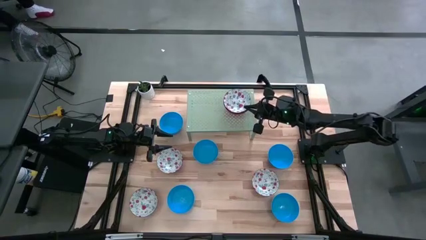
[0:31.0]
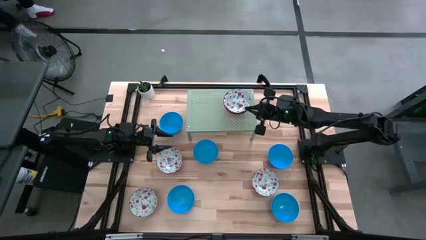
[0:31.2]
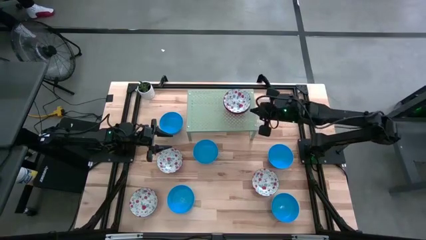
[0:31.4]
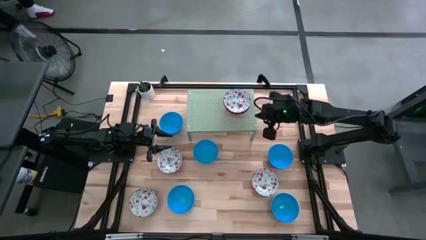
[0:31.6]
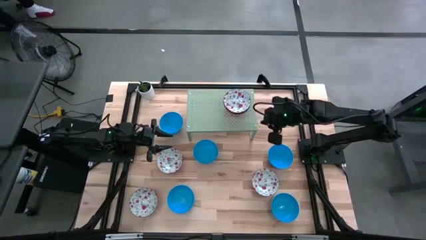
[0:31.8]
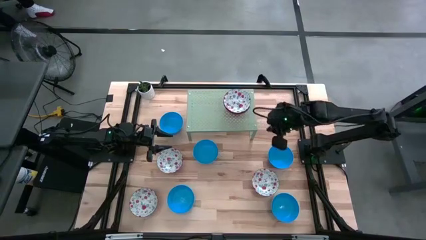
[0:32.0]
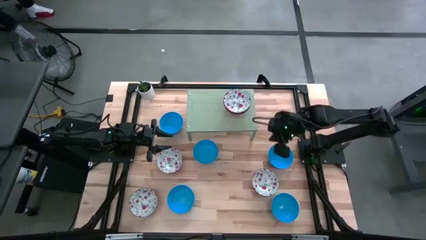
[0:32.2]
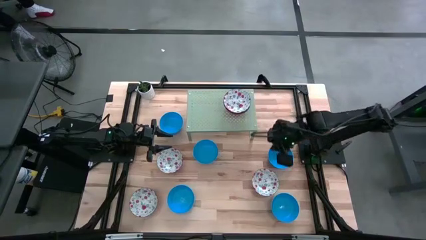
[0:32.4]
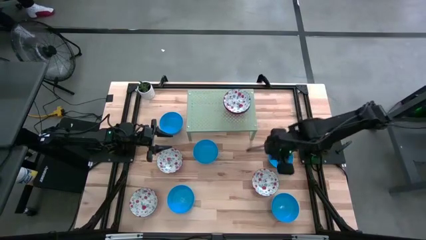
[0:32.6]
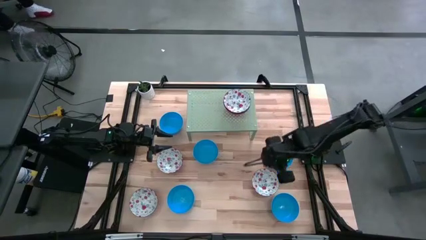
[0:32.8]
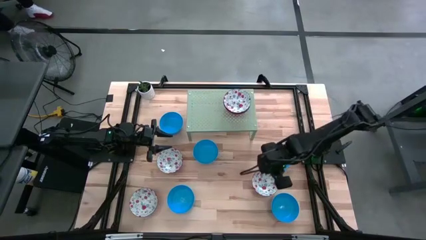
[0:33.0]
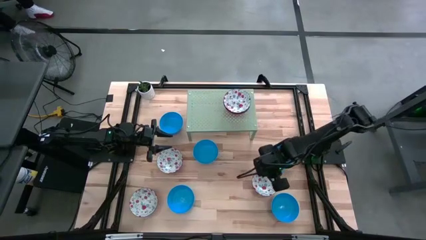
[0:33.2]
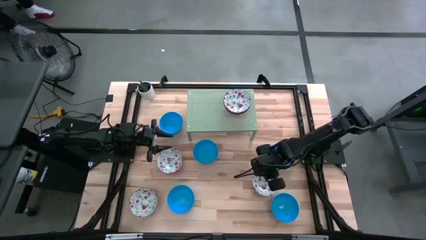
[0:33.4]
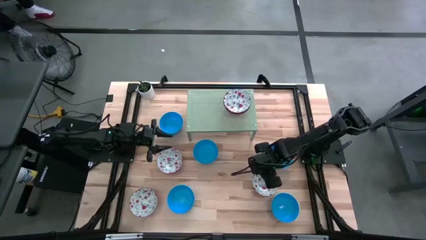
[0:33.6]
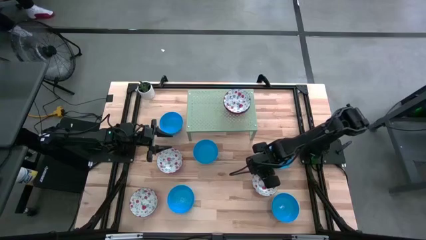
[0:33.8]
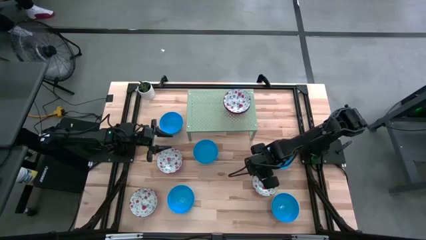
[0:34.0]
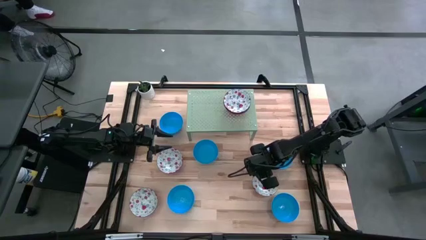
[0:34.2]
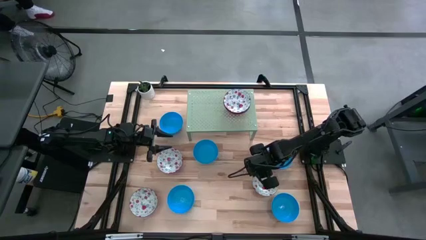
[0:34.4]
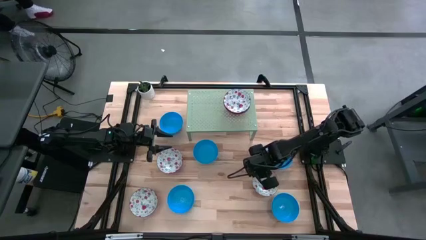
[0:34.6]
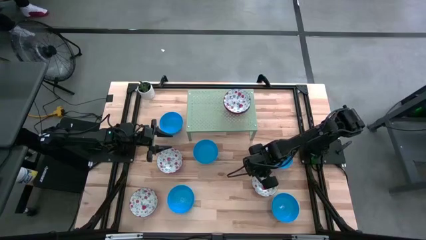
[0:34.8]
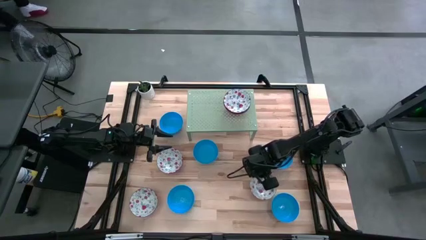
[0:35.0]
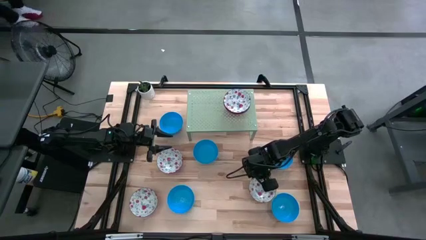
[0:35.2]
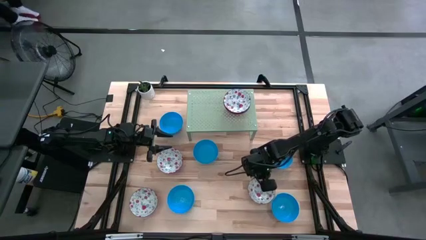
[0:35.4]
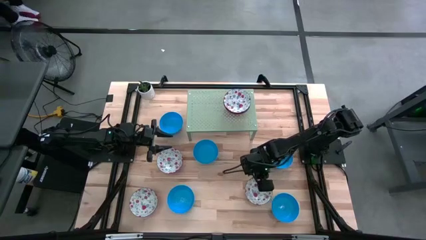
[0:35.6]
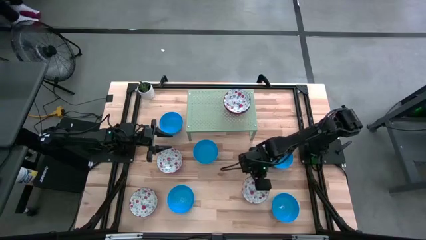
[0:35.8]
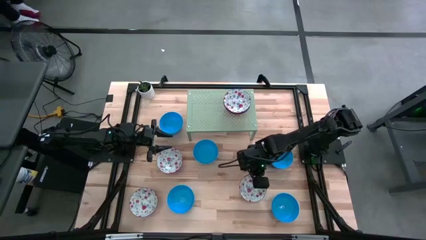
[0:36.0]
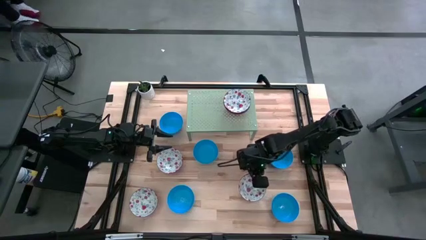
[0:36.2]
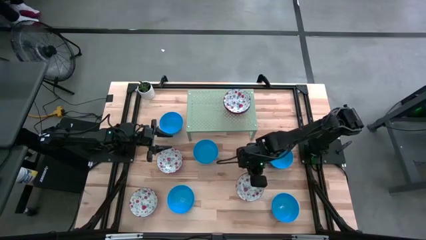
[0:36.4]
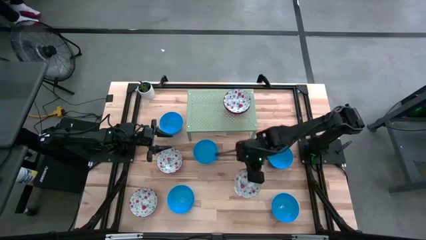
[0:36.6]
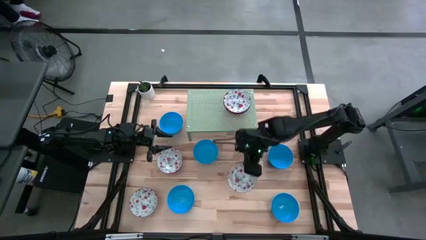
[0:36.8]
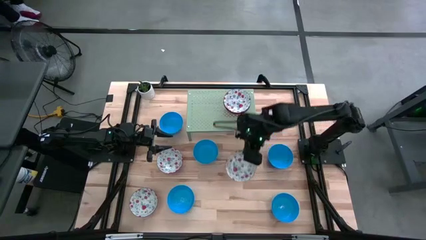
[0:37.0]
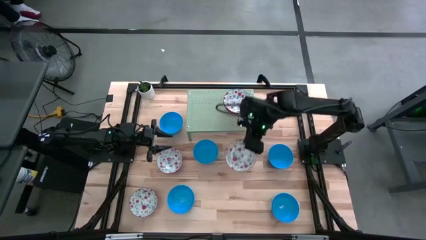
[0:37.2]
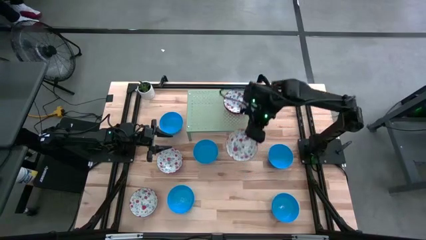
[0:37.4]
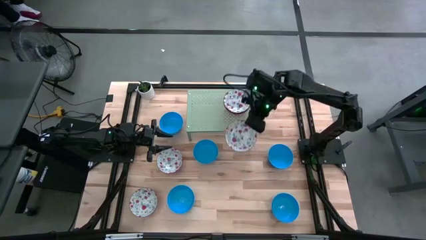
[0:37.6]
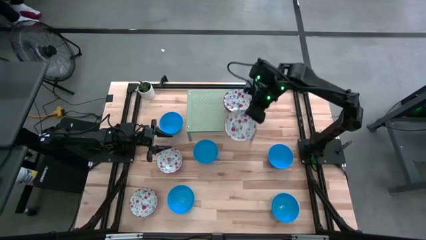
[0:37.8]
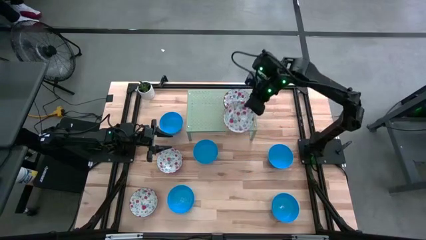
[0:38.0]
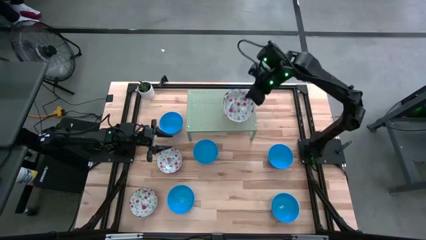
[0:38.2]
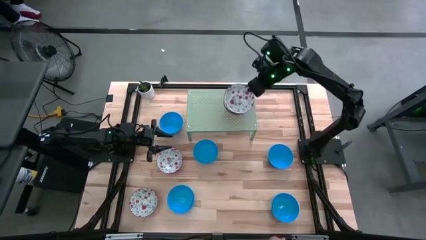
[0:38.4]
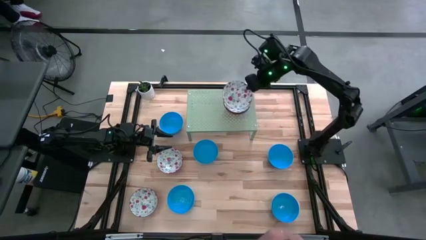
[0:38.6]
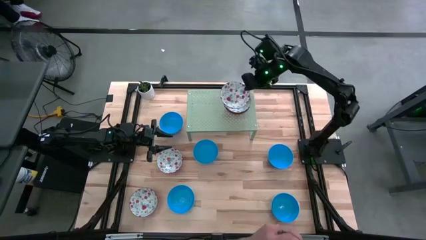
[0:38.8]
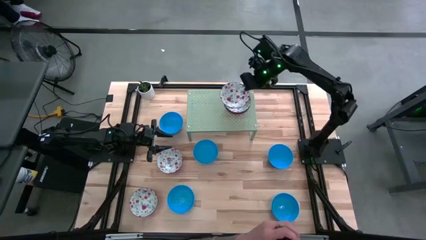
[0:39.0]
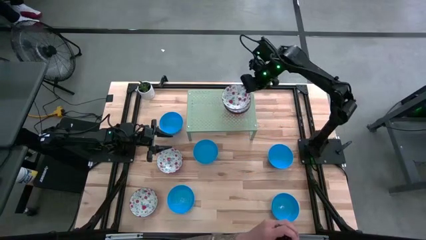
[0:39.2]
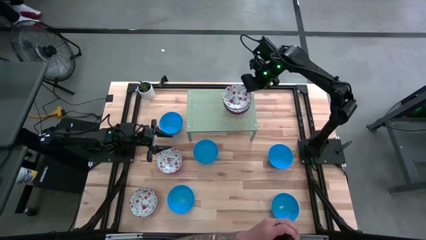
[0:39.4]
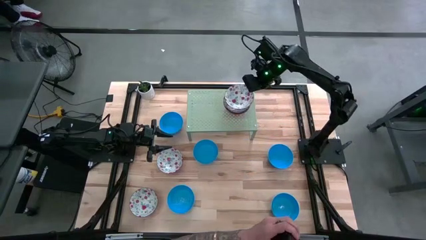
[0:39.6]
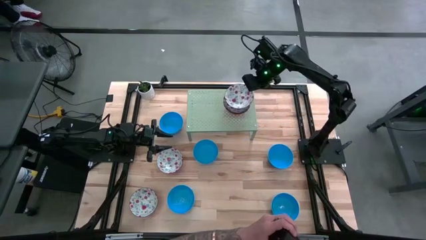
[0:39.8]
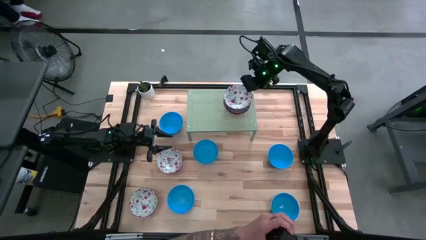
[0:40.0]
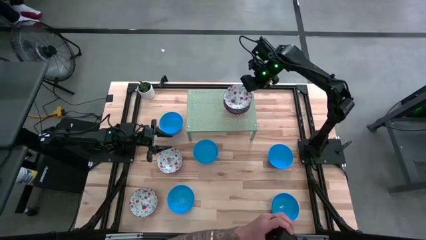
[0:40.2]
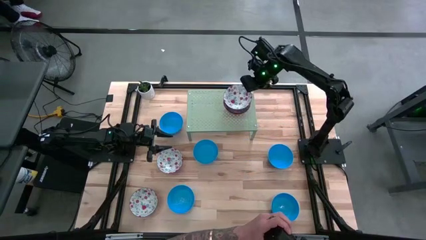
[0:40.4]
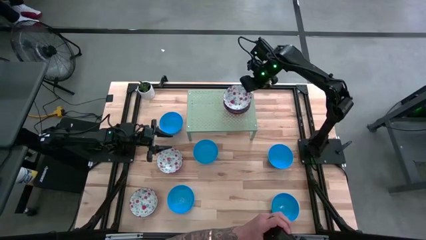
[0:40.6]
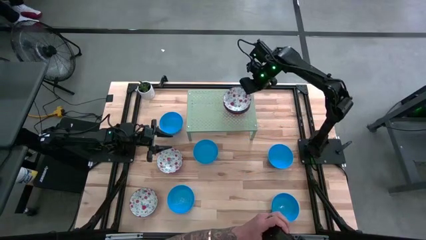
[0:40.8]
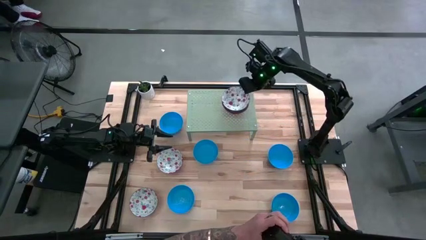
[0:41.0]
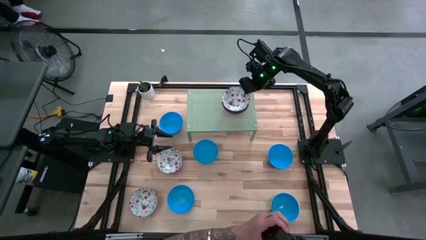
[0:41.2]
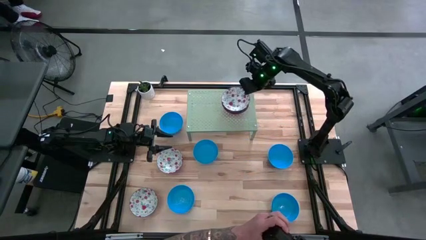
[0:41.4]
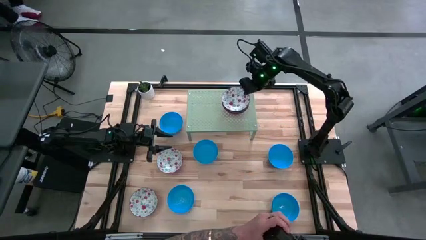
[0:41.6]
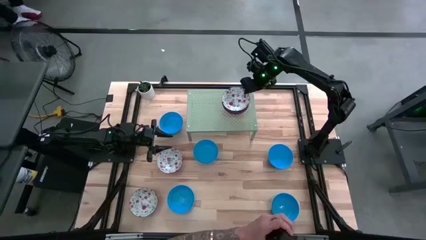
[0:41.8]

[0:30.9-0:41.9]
Task: Pick & Place Mini bowls
Stack the red bowl on top of the red bowls on the shelf
